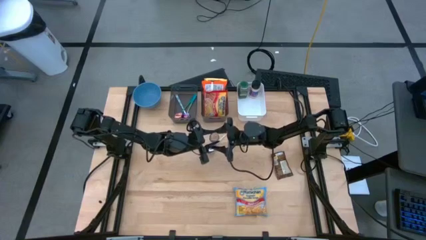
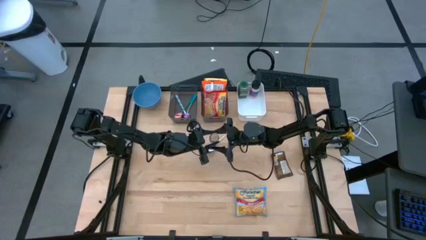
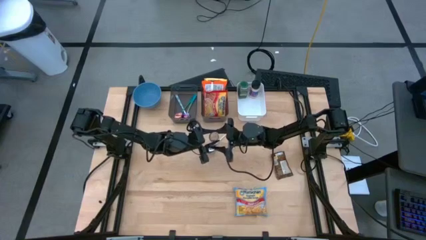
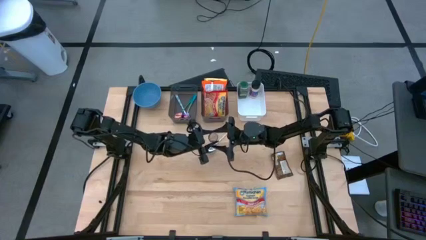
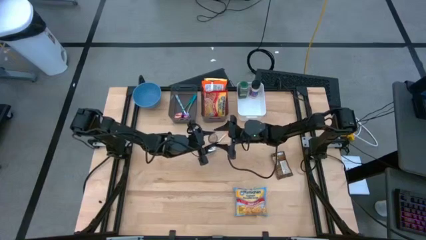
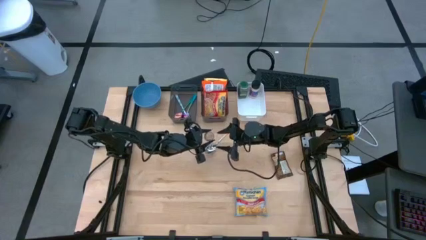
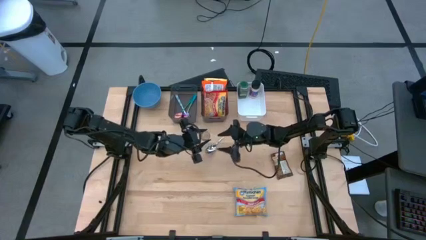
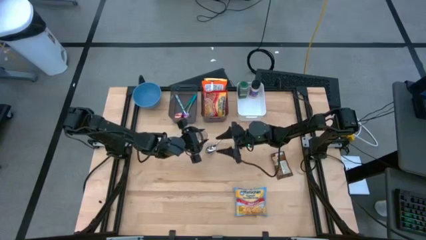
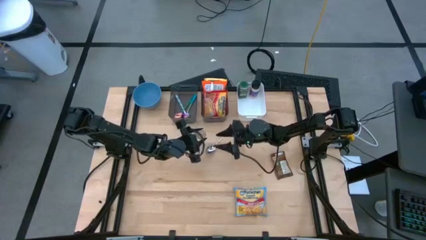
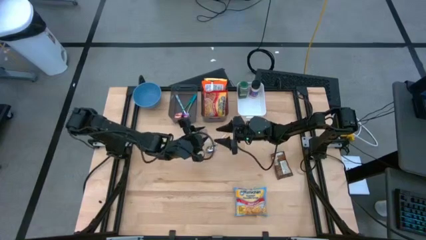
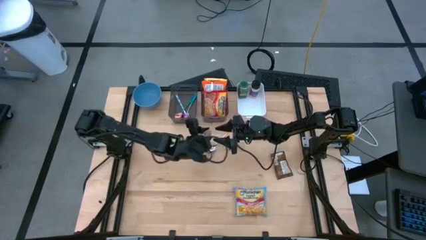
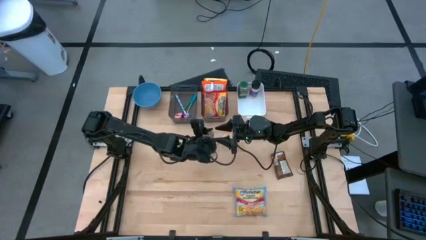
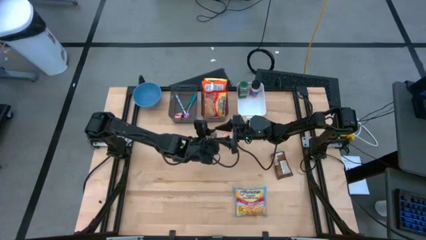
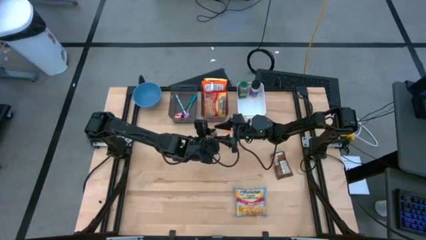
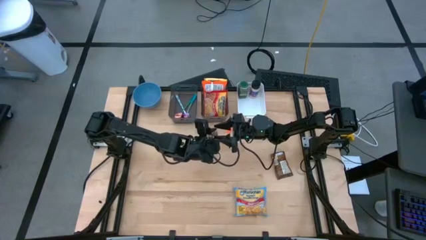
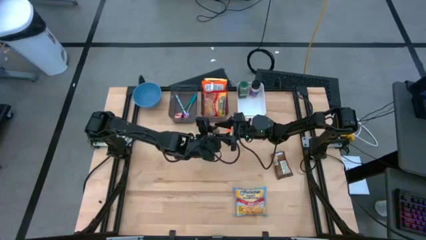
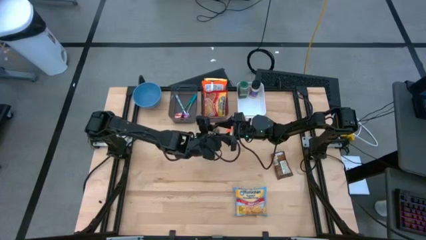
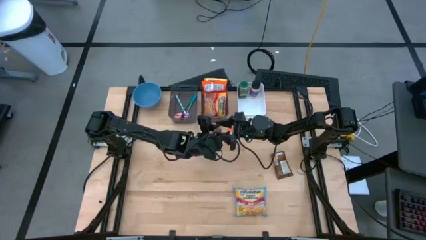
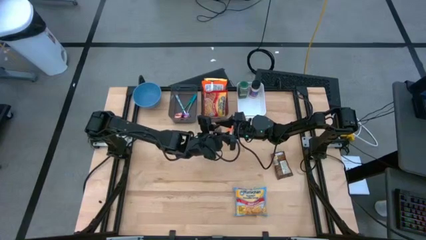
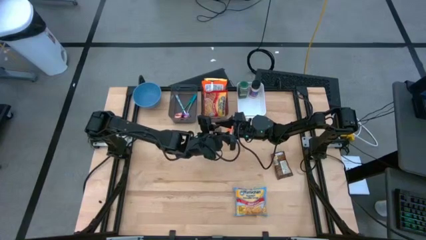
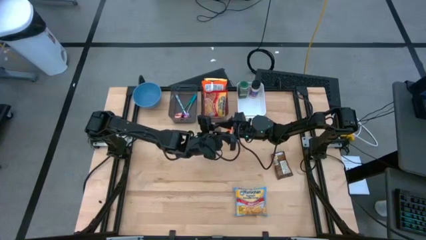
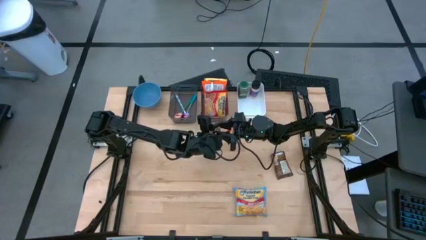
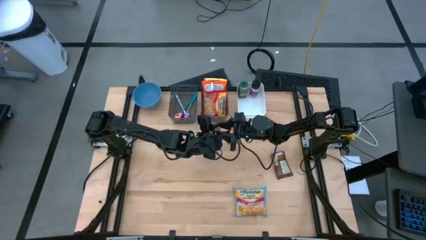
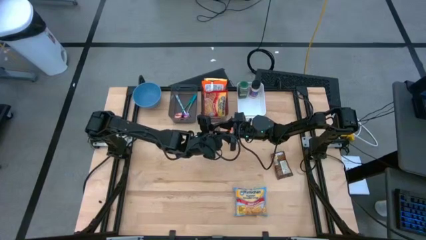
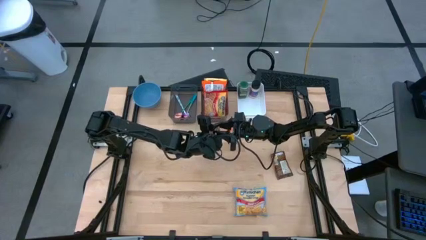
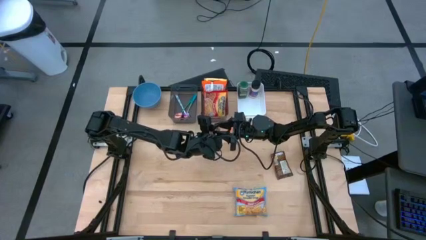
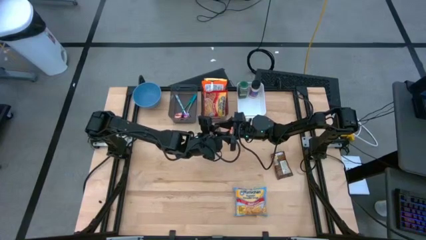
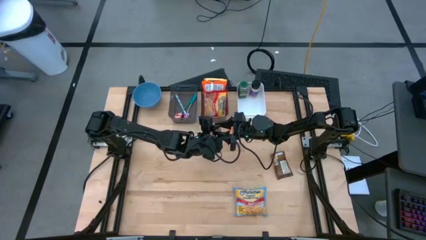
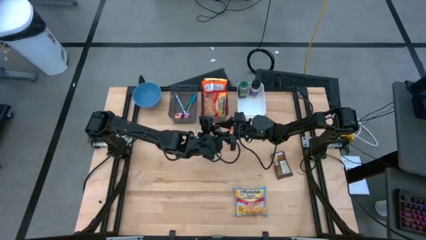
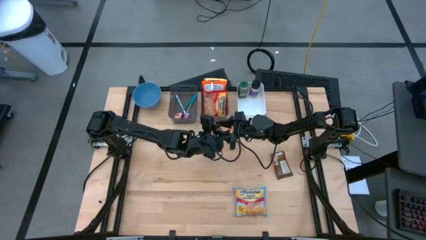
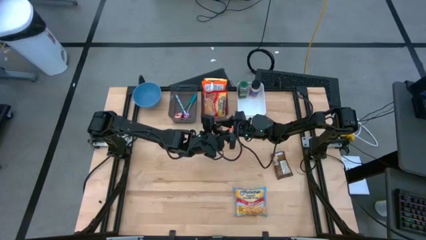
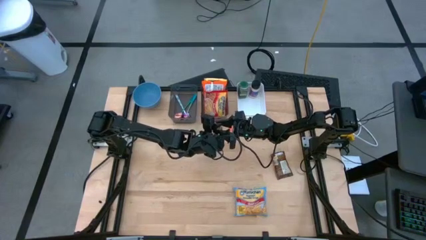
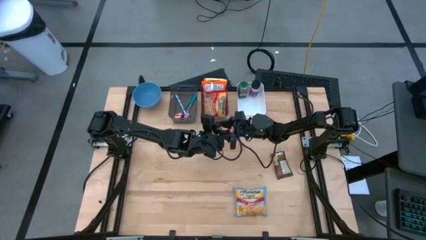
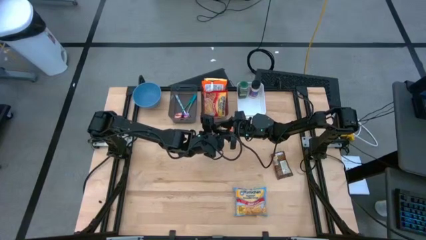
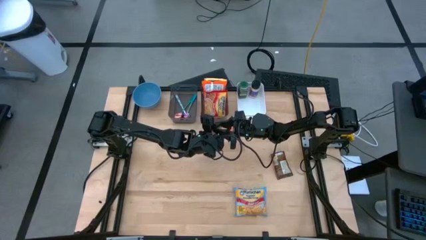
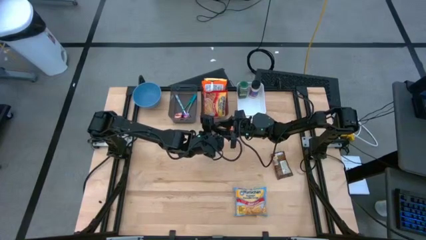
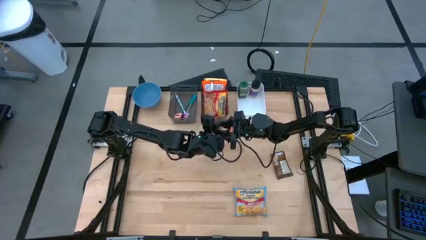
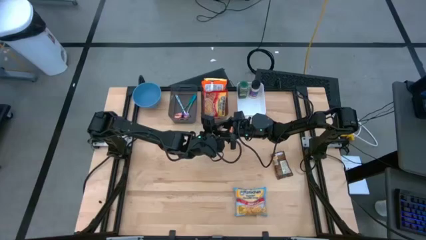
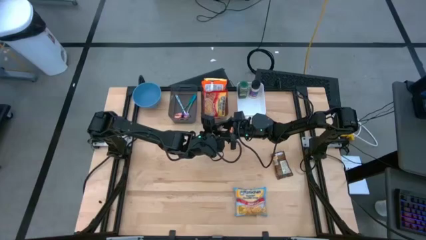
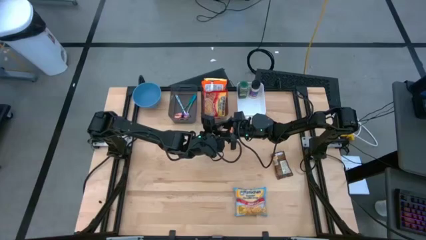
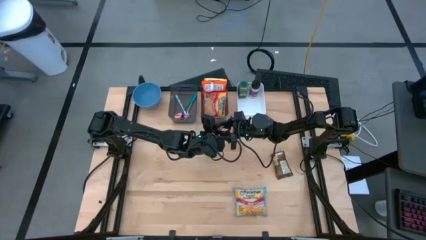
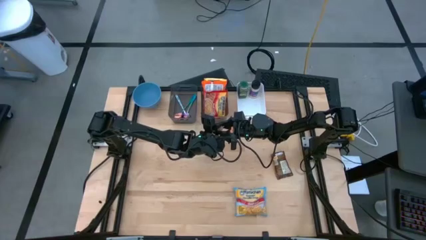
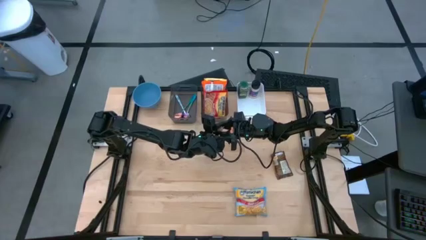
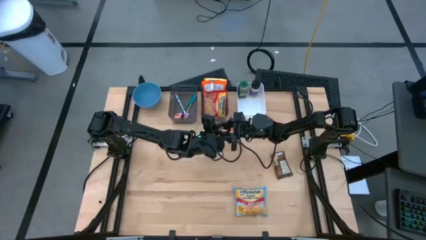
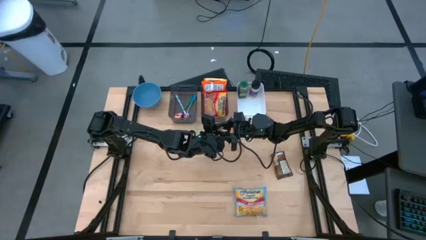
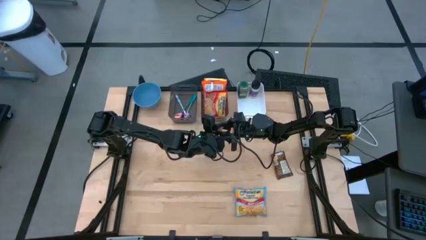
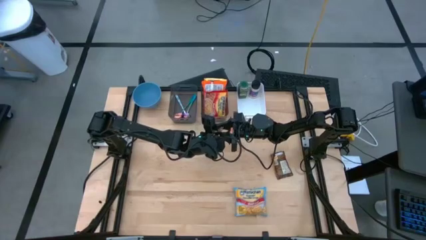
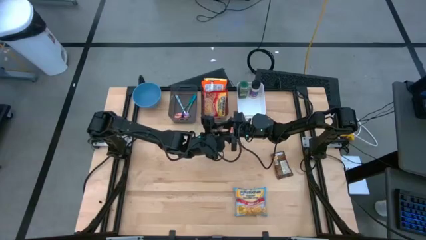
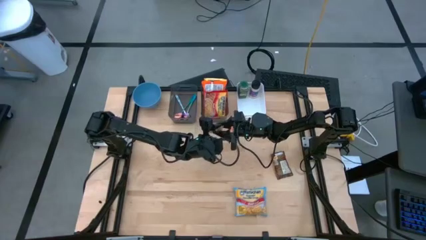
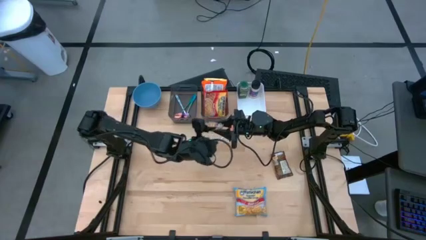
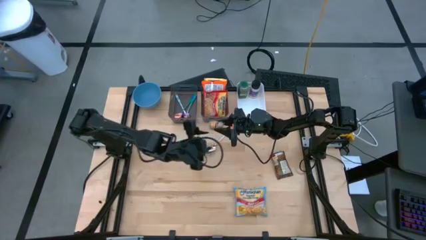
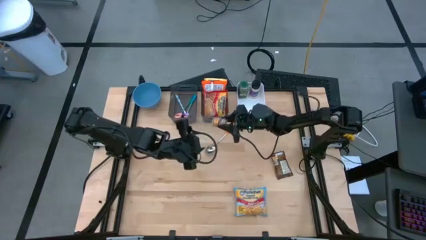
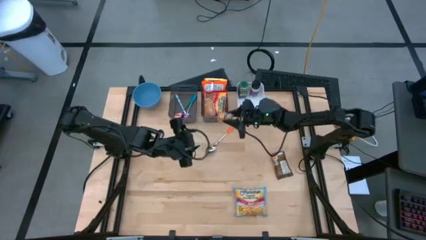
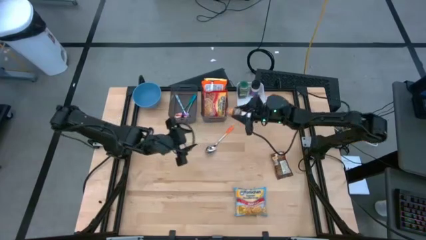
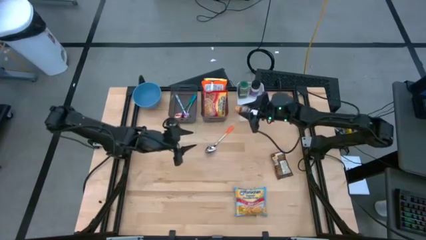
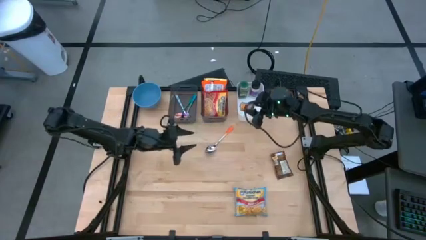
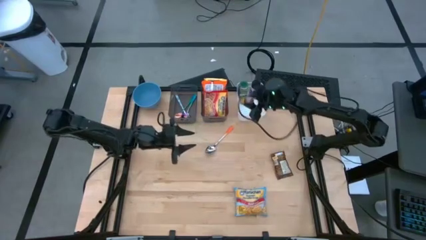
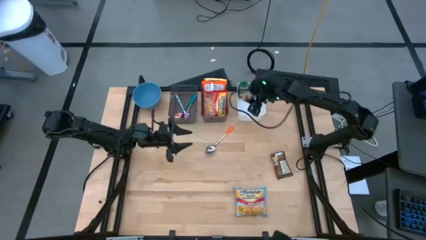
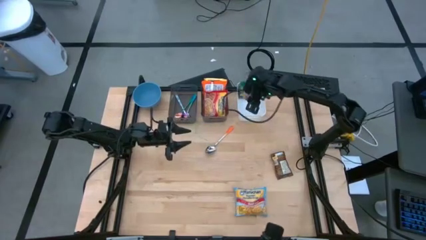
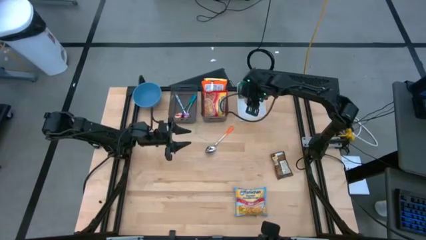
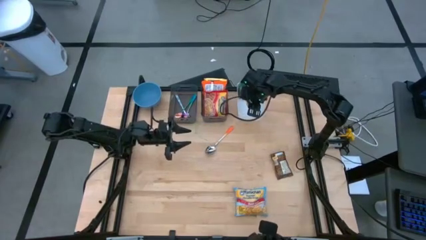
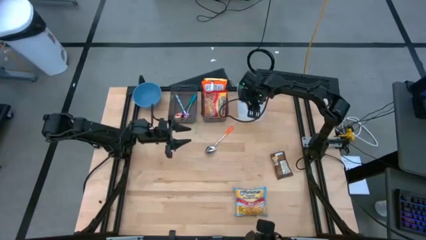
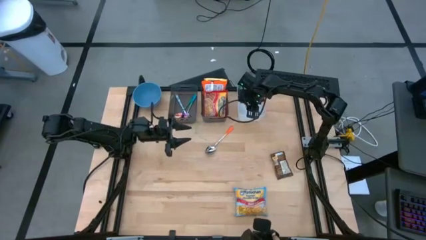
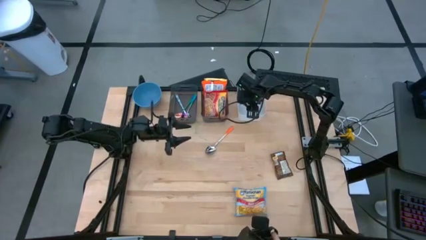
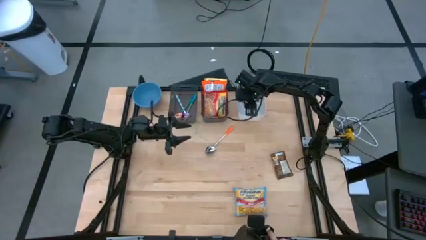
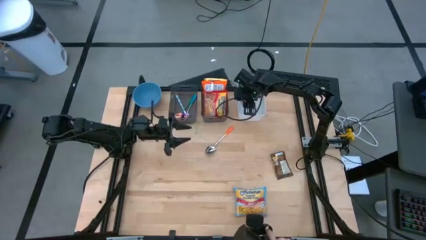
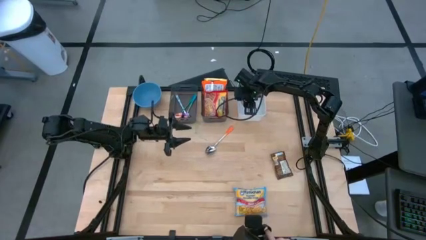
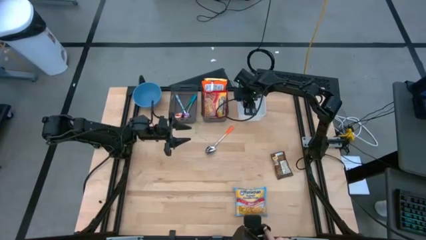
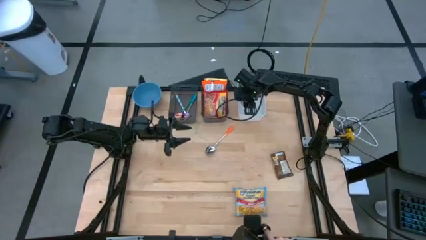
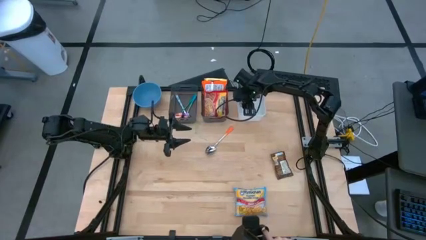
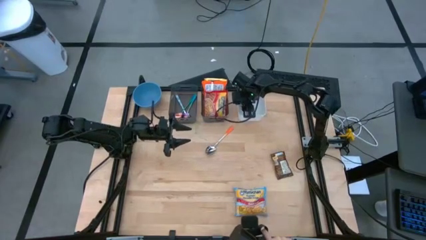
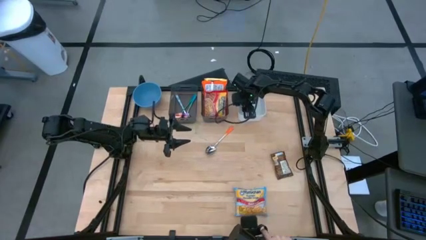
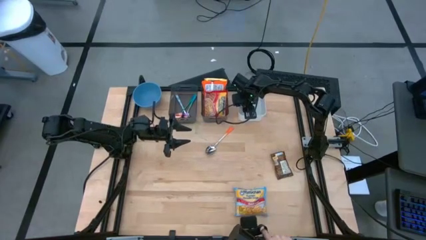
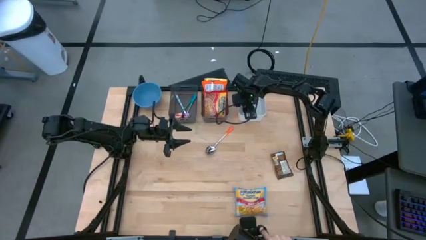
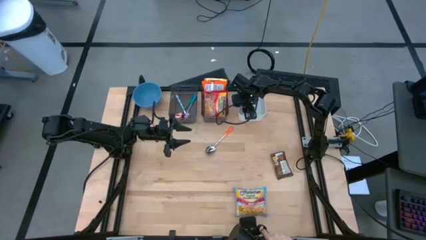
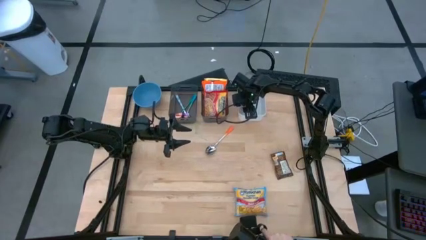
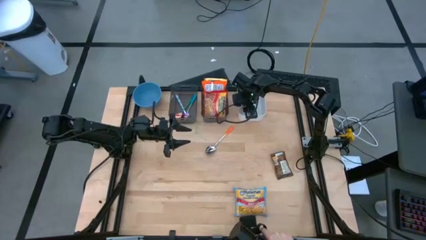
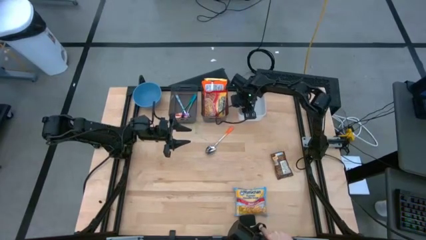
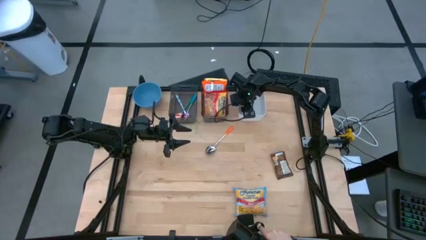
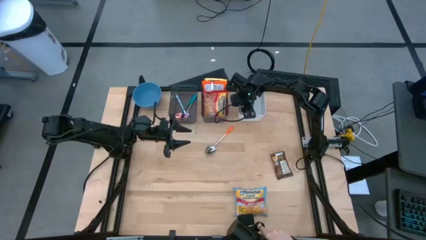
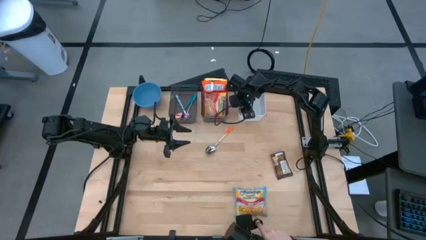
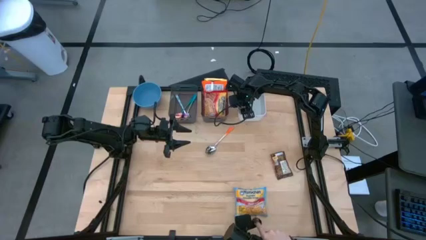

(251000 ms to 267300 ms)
Task: Pick & Place Food Item
Put the brown seasoning bottle into the white bin
